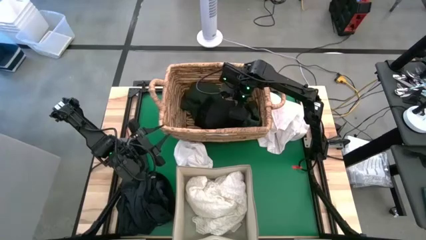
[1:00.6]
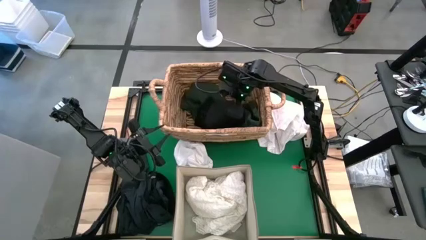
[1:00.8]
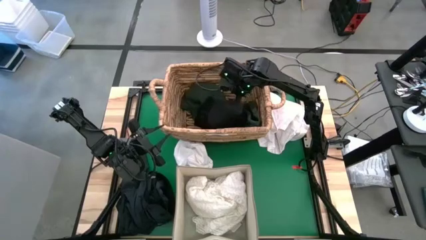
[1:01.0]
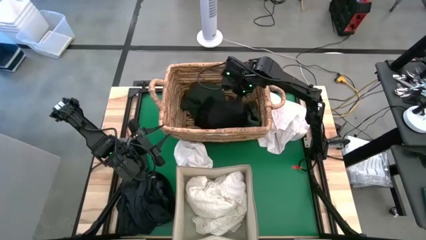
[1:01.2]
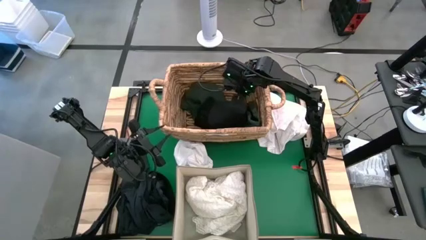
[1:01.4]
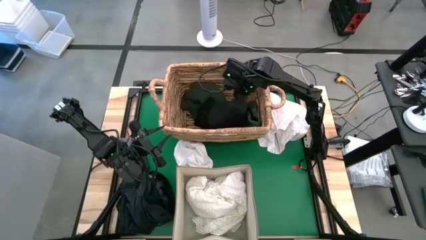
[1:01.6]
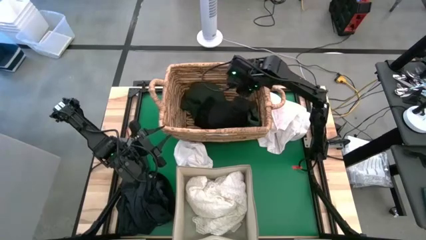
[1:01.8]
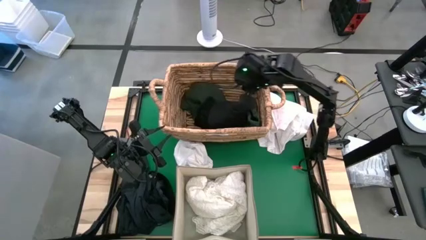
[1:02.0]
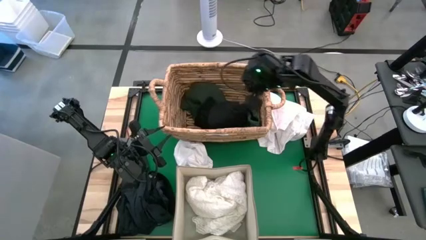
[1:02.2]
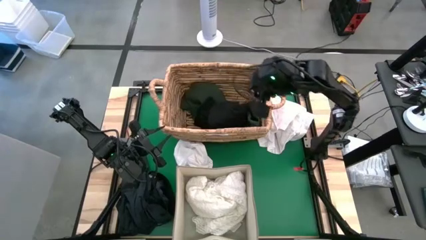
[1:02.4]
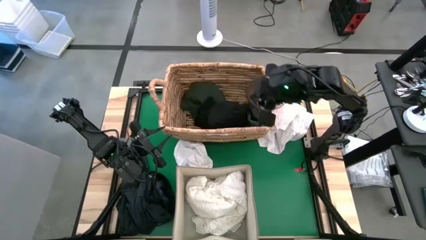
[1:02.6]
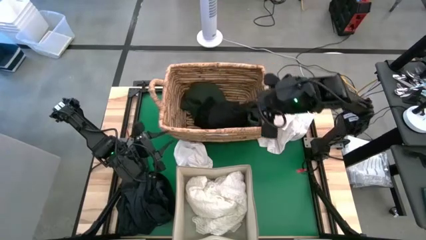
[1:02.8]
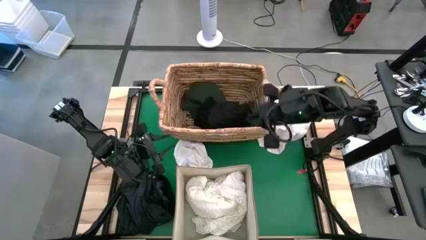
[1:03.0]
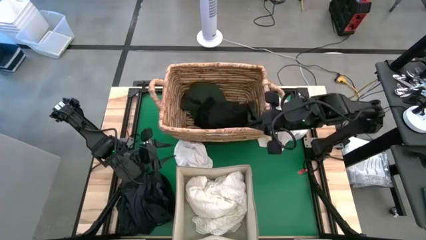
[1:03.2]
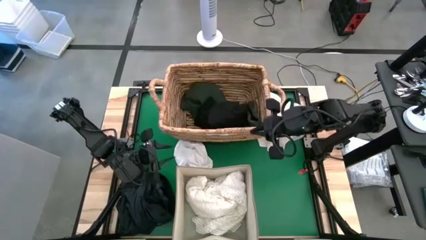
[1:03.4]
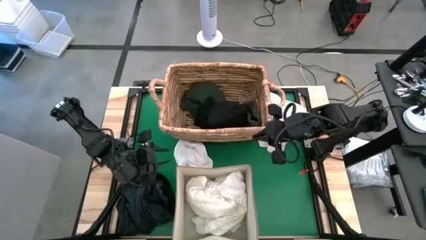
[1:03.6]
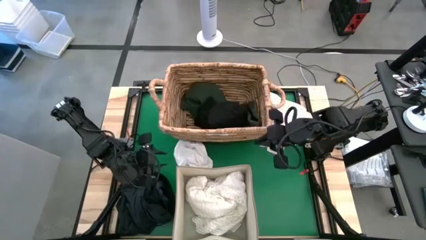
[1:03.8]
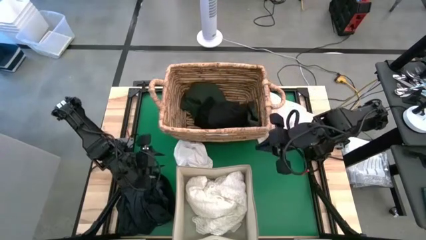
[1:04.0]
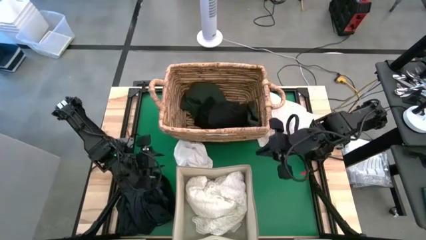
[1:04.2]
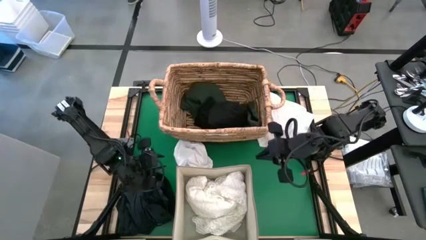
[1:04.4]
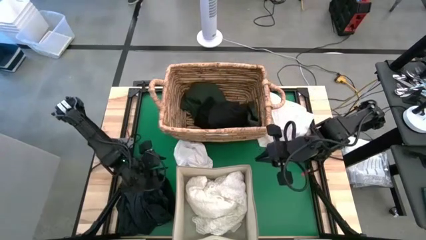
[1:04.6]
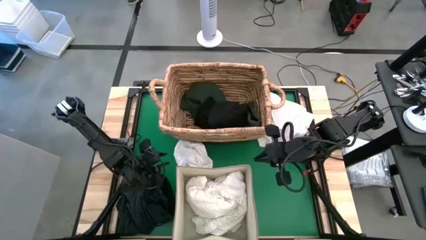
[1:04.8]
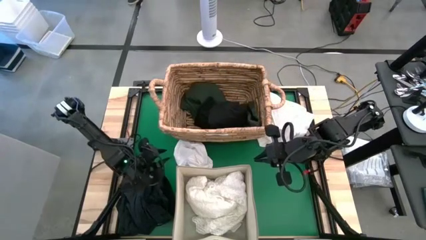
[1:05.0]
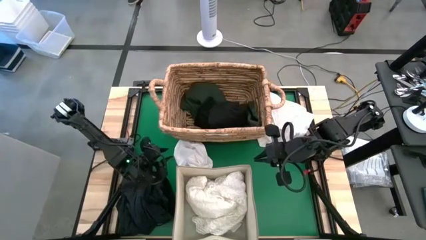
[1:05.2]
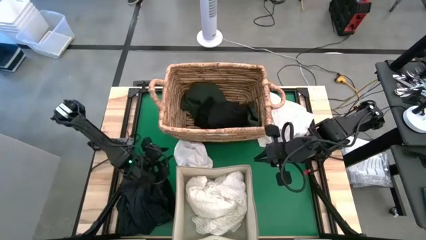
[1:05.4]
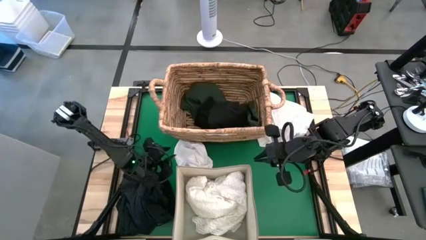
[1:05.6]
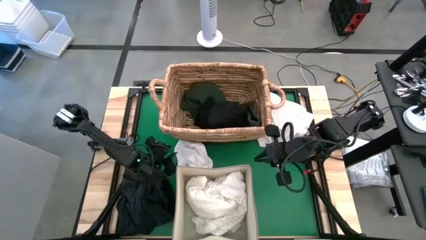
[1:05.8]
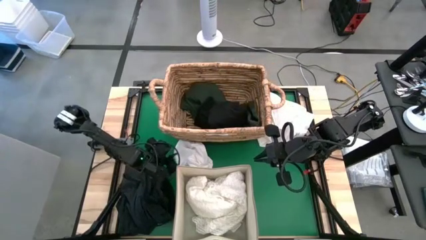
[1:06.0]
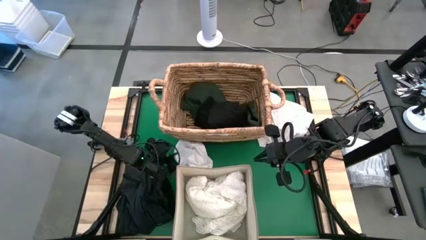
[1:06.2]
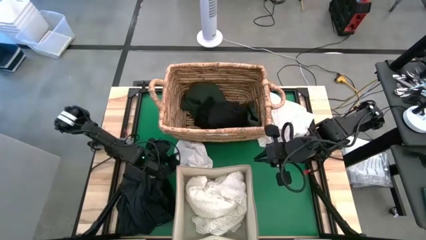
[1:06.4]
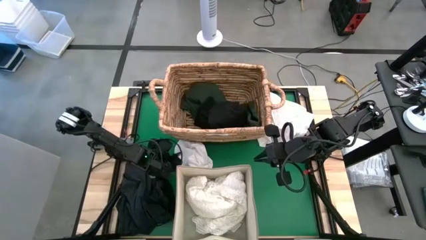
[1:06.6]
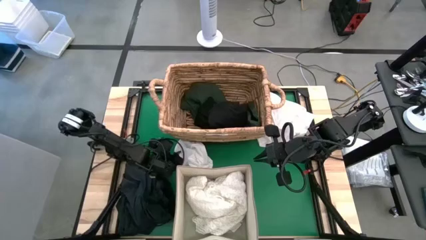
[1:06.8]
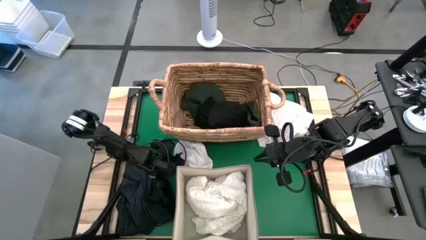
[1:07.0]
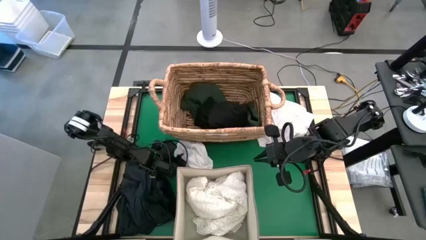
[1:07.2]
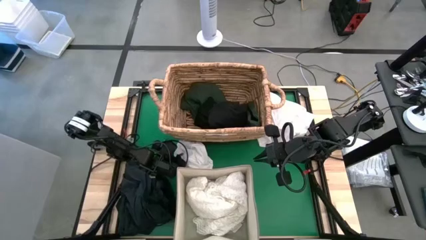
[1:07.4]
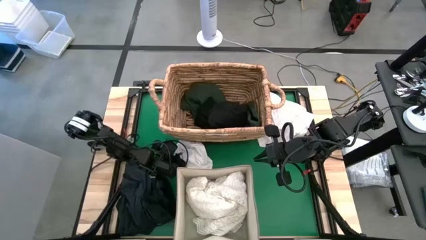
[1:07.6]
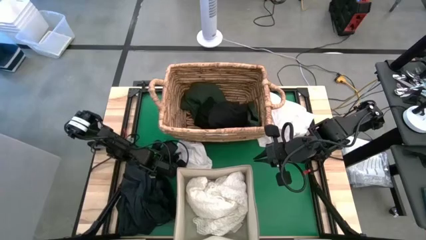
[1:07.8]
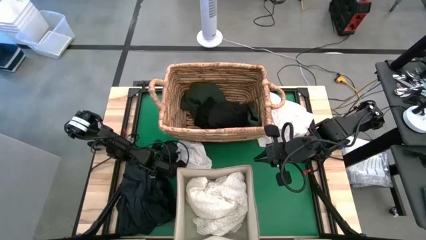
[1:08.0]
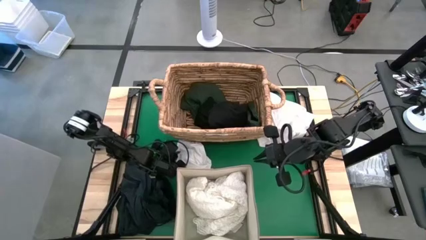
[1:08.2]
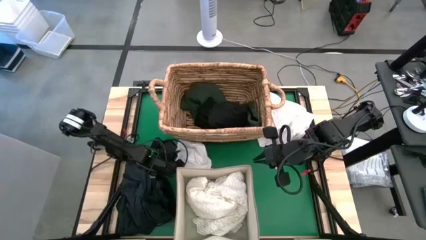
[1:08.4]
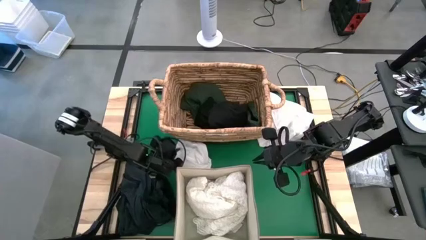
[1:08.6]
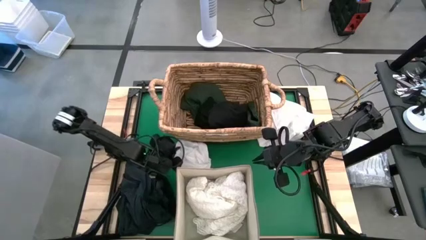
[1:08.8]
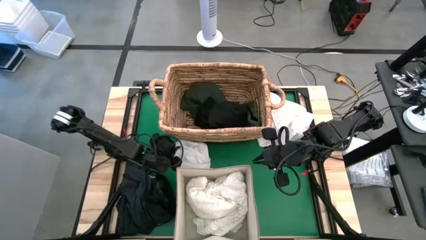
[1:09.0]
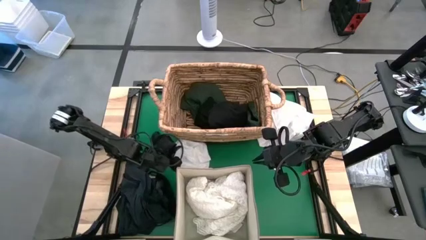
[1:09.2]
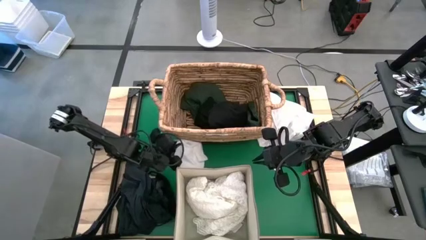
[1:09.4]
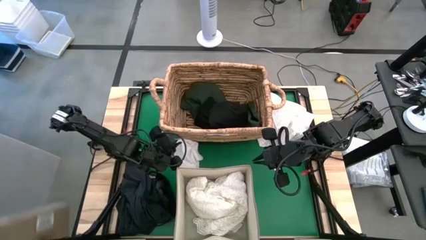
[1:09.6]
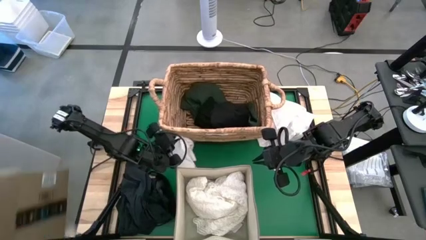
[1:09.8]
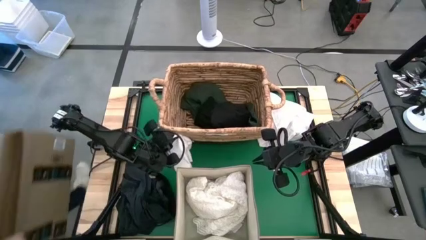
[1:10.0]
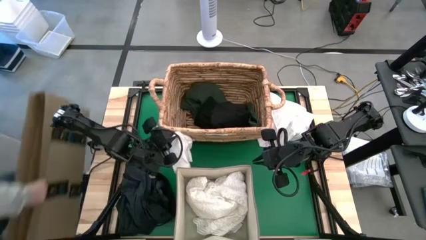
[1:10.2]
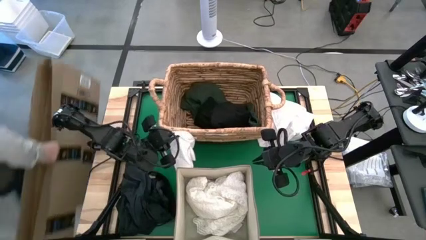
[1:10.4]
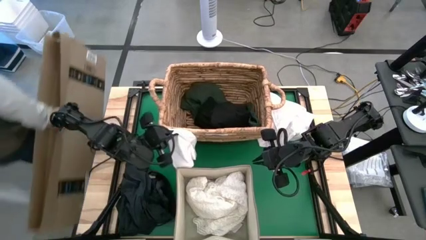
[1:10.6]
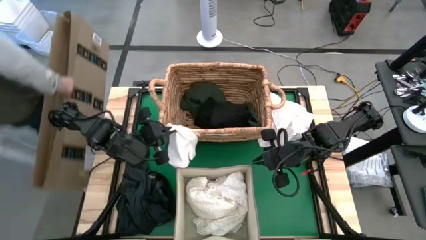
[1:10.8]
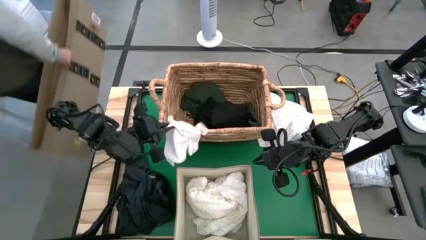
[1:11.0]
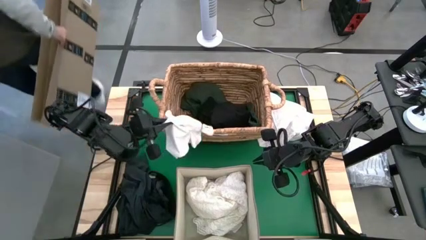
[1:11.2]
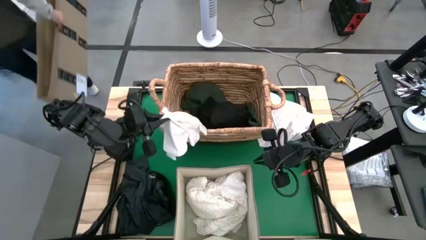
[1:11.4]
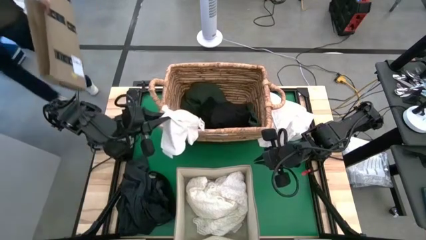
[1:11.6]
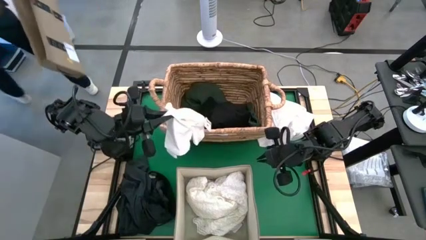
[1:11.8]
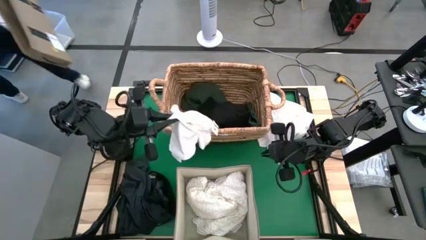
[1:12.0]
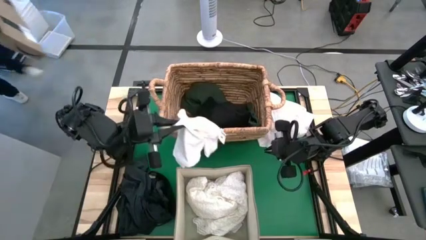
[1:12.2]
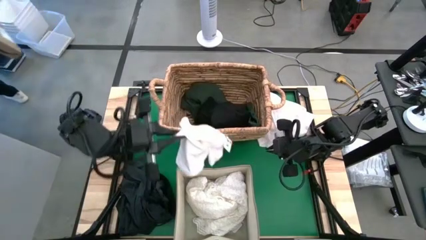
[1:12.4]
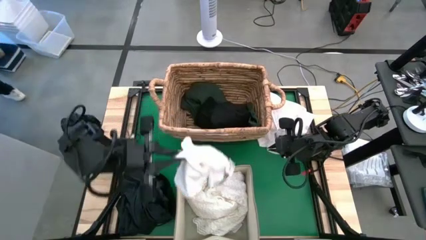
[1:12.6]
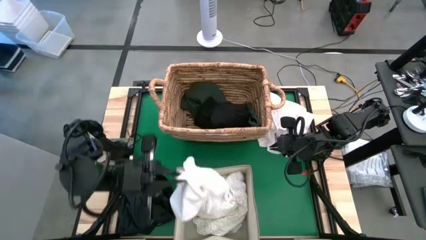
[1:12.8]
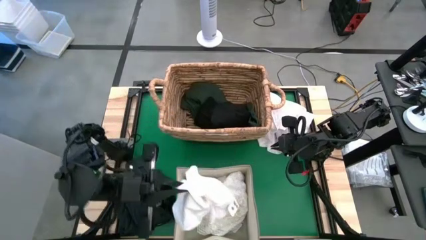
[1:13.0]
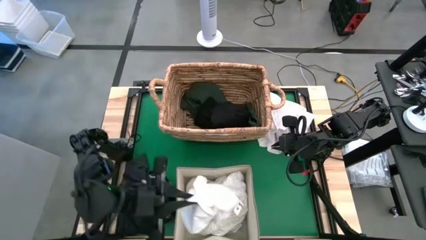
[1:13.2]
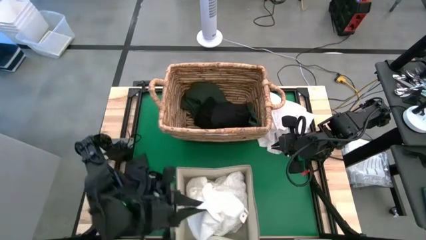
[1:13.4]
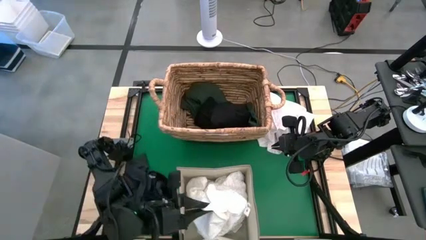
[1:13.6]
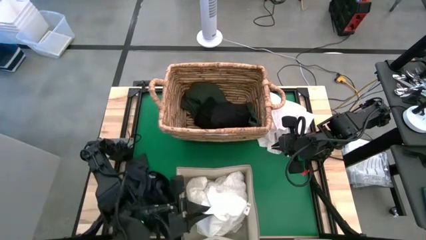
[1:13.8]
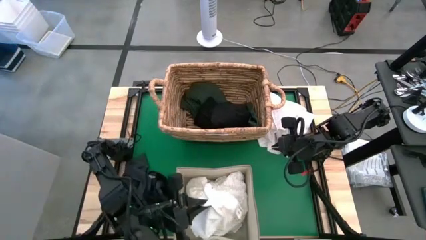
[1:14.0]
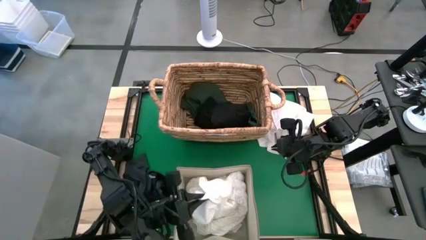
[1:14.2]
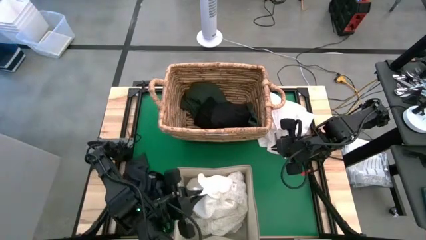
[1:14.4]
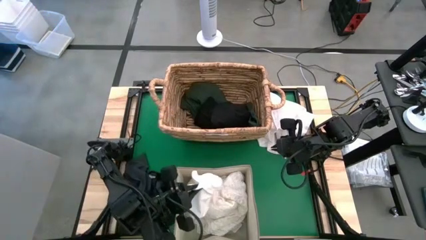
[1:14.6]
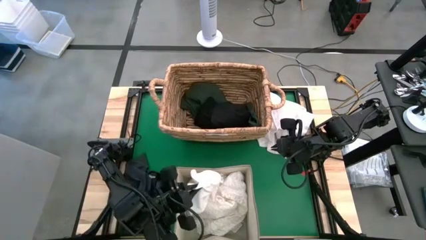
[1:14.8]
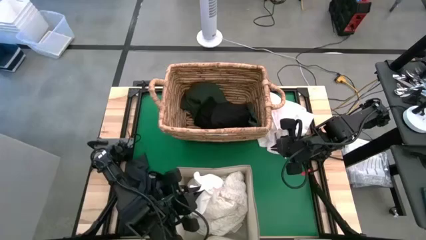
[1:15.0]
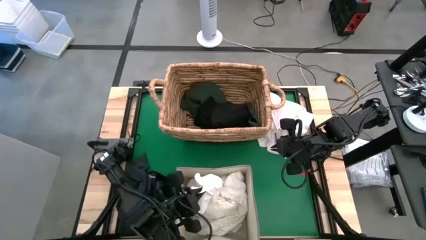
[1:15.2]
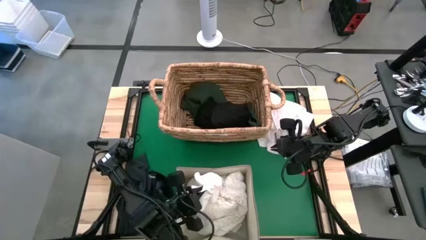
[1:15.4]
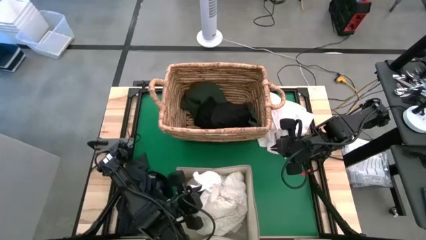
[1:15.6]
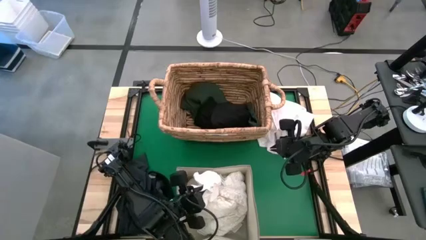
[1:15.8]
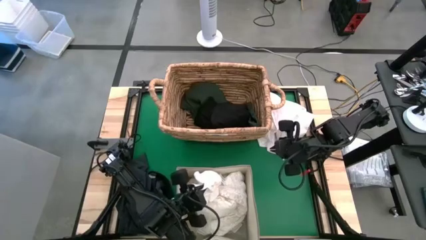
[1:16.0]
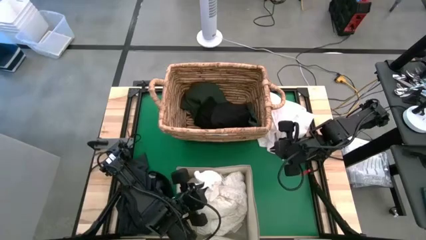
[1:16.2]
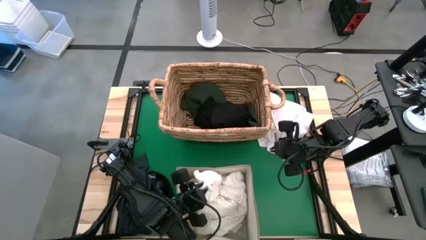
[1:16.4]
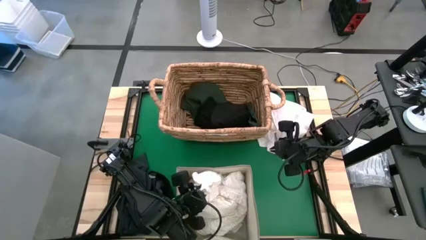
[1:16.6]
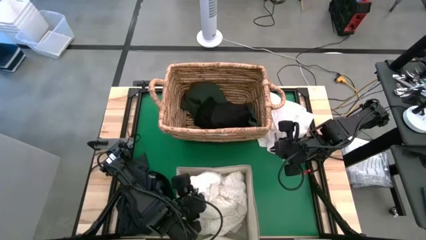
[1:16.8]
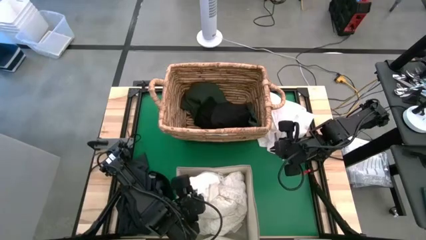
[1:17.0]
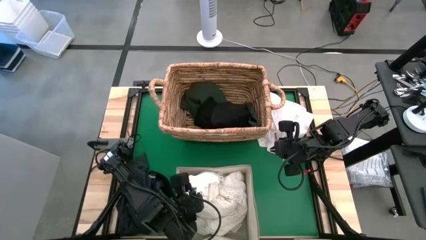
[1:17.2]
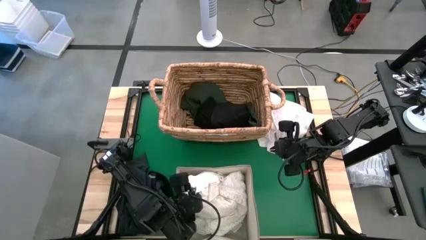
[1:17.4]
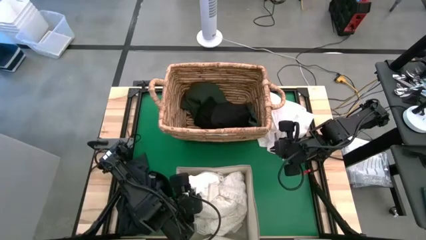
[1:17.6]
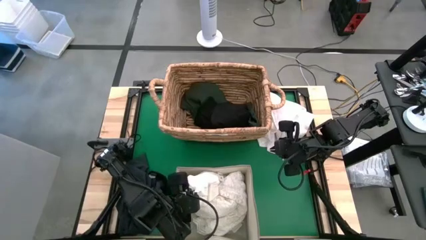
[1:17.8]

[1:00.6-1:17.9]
Put the white underwear into the white laundry organizer
